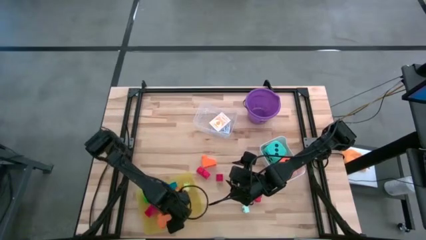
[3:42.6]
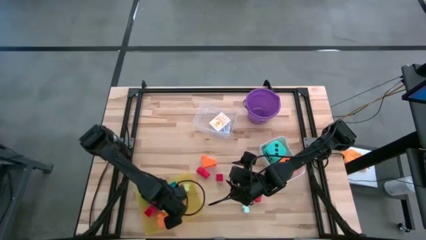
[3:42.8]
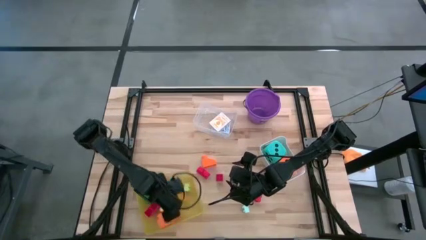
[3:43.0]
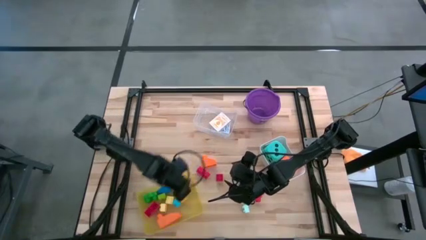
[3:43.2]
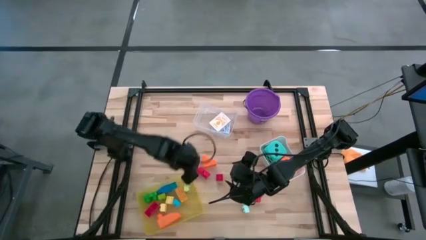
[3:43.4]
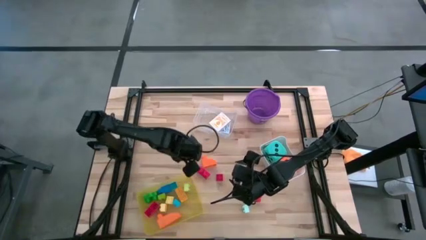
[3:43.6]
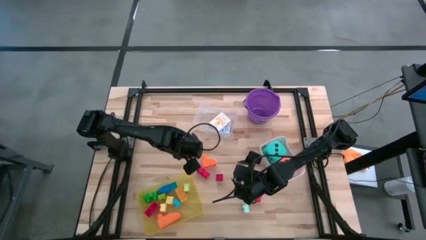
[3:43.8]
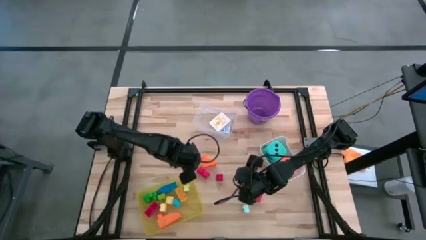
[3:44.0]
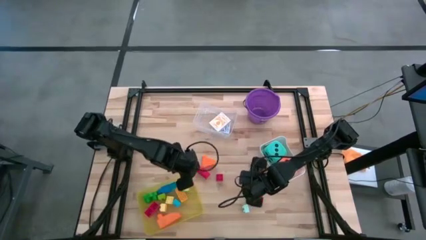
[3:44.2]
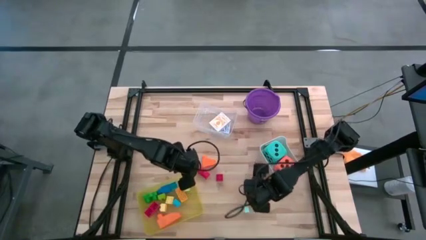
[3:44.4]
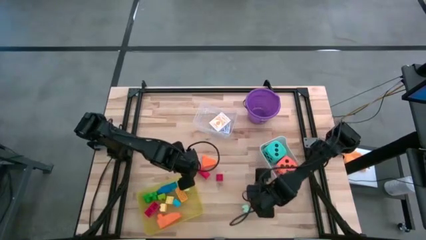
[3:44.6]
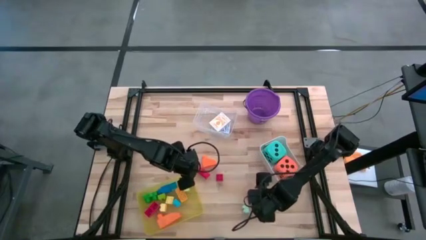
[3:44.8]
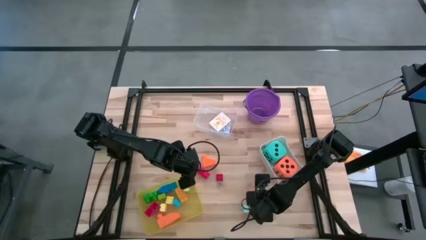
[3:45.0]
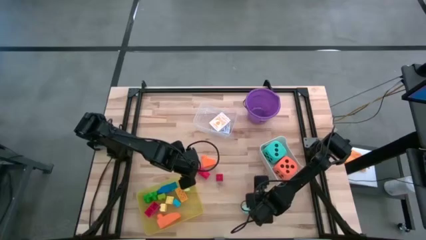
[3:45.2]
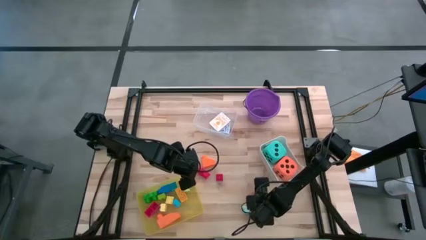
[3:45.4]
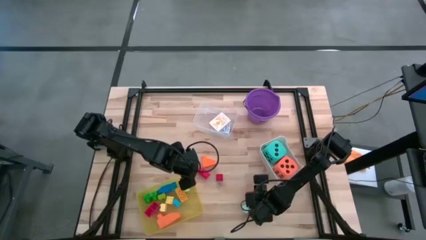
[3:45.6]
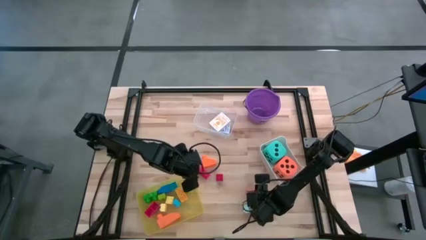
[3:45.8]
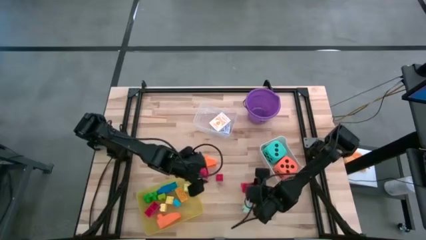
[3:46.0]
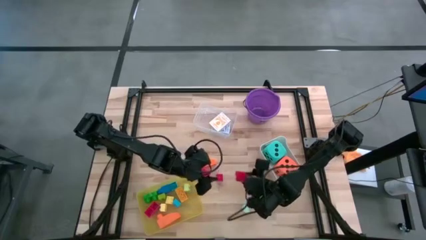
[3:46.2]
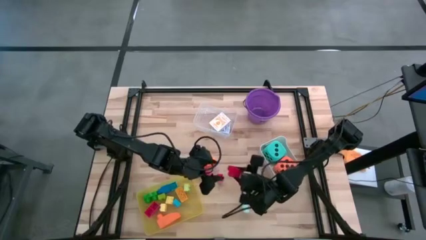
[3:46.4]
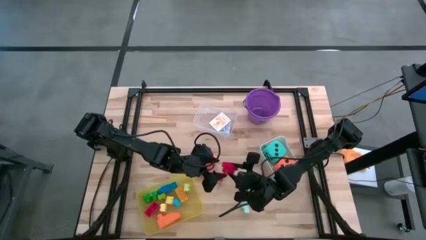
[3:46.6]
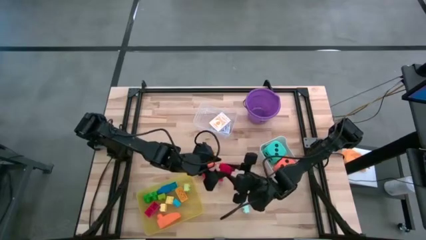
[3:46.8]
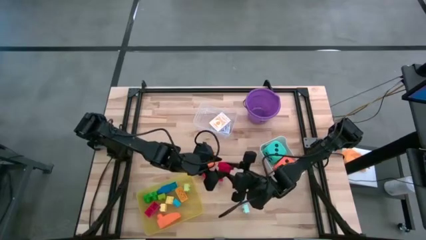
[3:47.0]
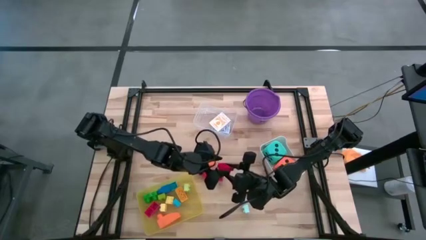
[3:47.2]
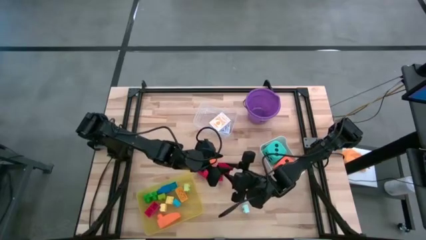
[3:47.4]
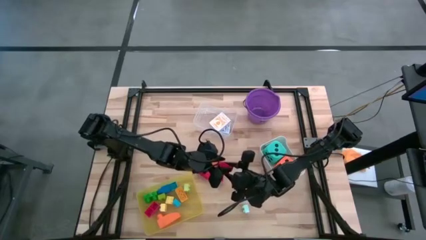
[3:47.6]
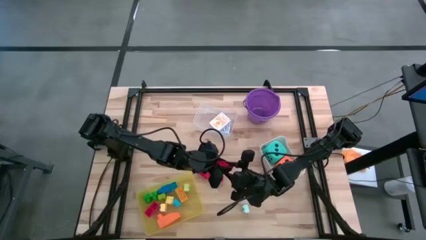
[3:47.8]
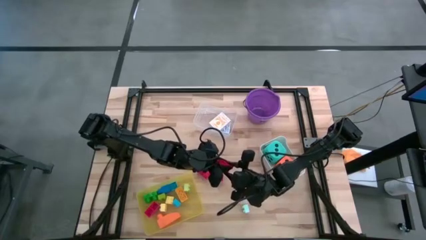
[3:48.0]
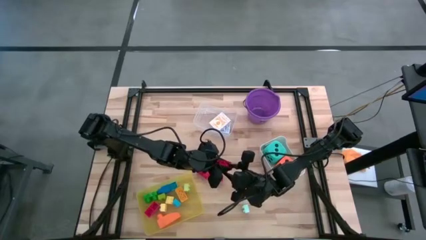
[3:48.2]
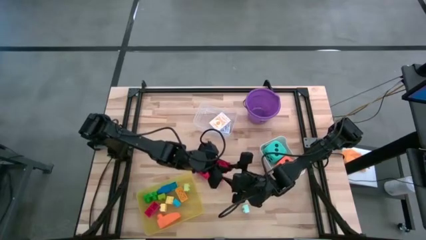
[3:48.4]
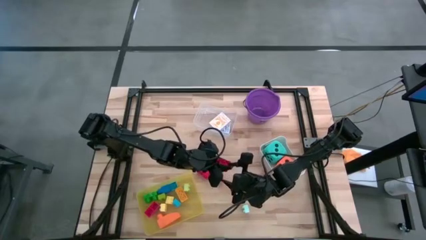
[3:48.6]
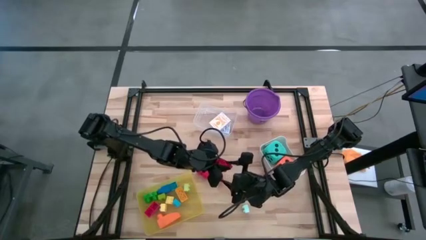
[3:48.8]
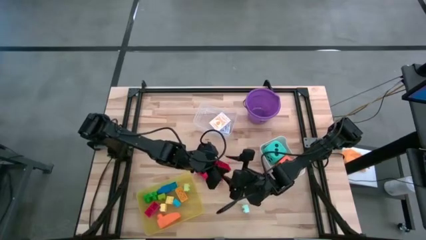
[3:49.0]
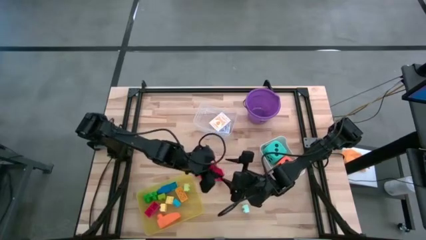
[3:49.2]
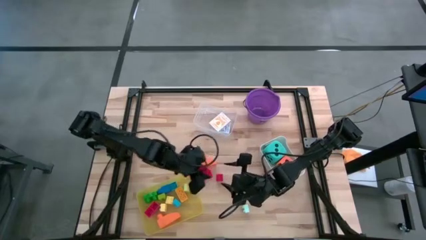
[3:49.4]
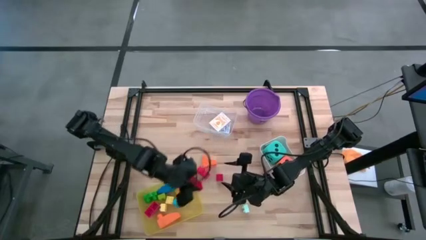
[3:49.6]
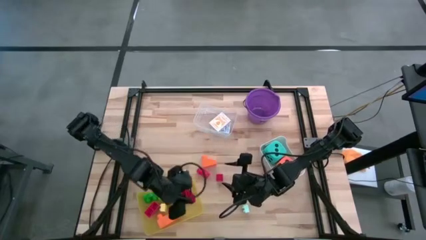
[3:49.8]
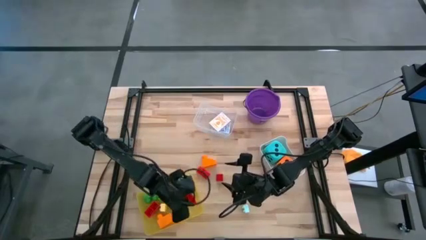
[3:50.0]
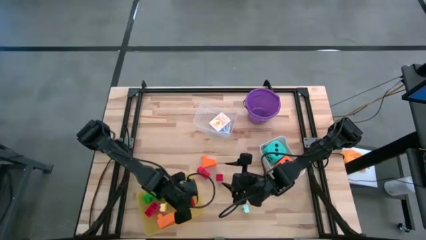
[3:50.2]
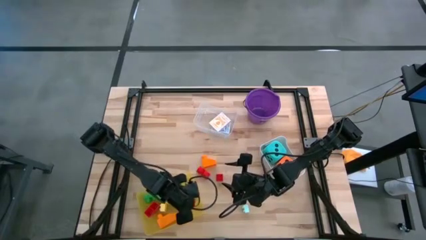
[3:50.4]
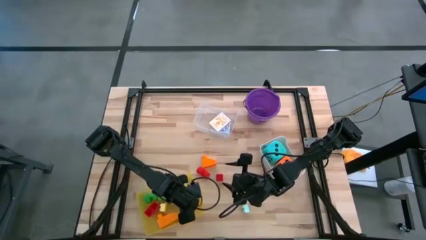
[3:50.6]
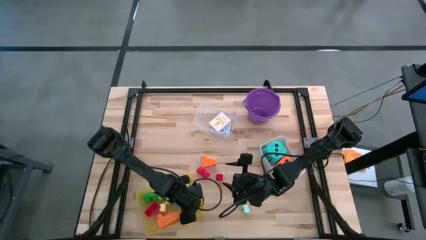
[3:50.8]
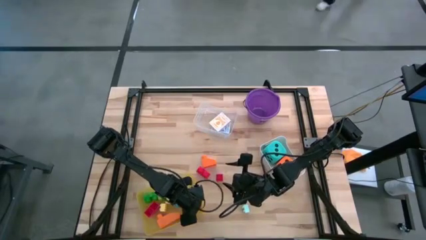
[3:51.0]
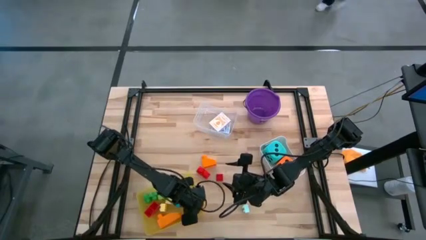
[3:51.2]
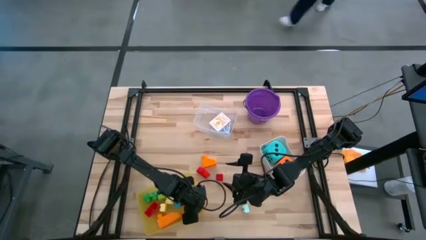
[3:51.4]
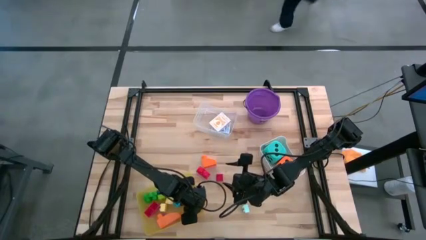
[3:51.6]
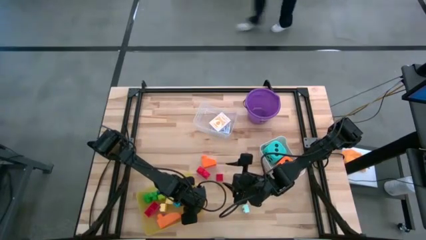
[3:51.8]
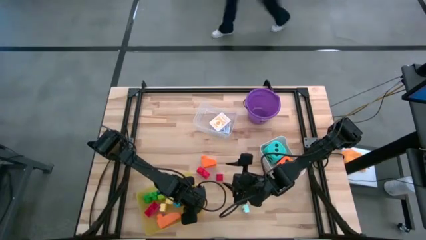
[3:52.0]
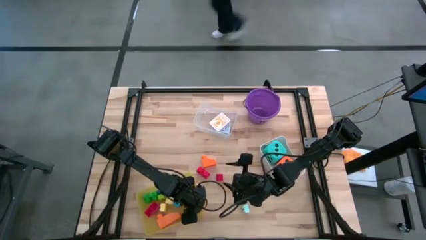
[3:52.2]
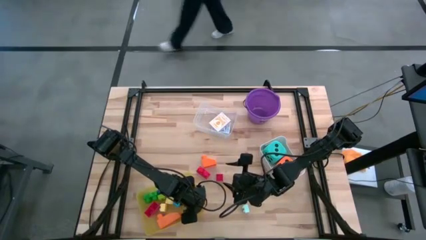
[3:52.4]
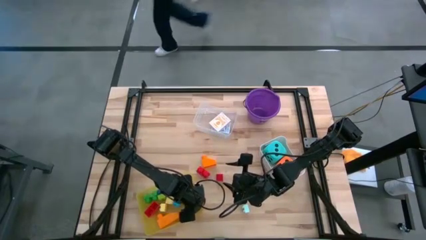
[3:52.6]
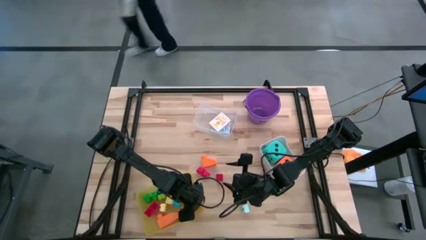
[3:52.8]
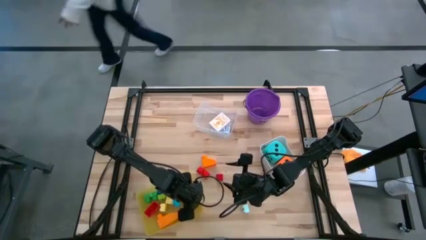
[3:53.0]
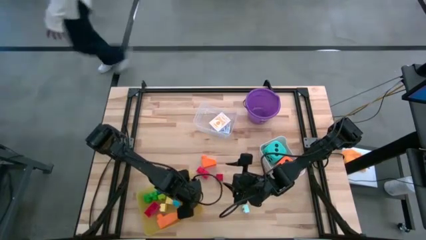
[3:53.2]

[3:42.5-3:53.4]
Task: Pick & Place Toys
Put the red game piece into the yellow bin
